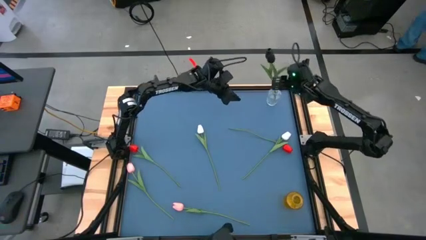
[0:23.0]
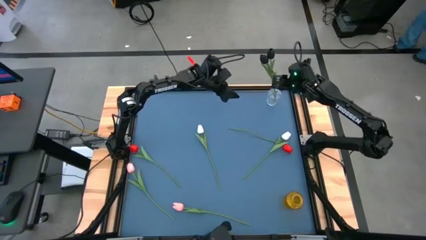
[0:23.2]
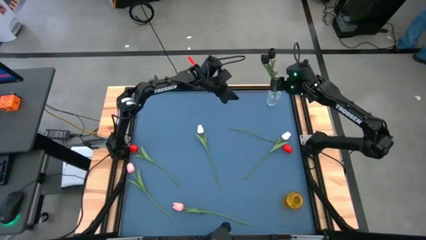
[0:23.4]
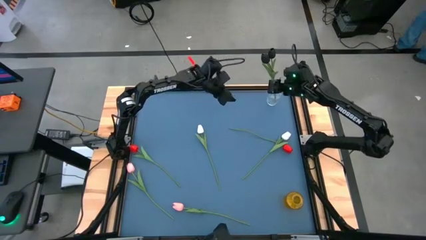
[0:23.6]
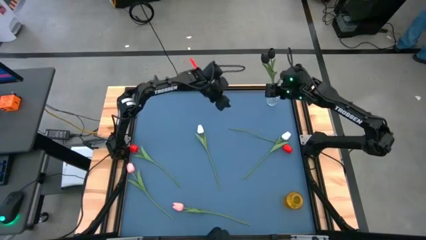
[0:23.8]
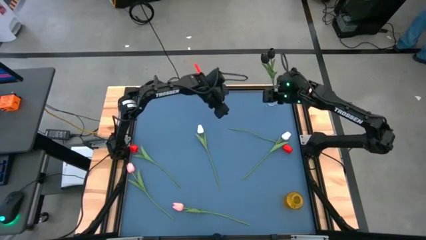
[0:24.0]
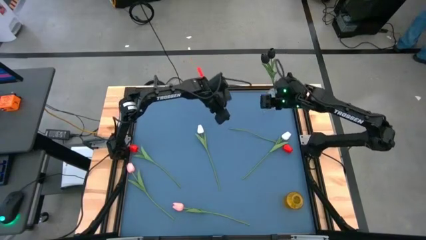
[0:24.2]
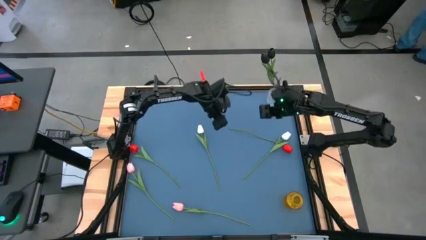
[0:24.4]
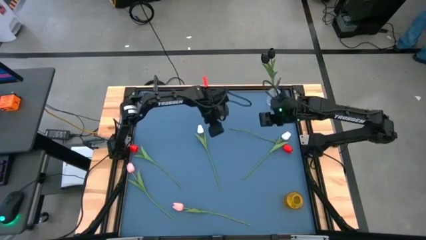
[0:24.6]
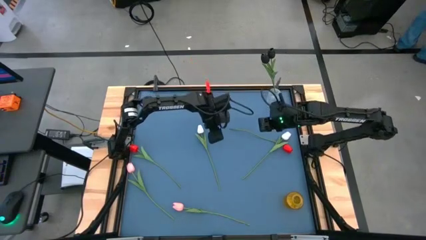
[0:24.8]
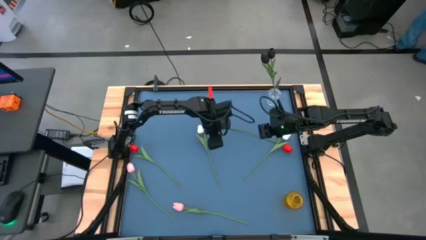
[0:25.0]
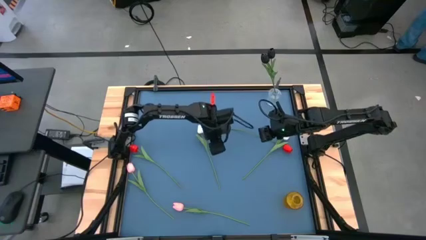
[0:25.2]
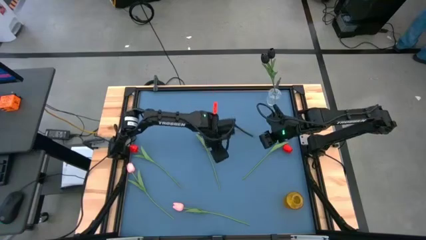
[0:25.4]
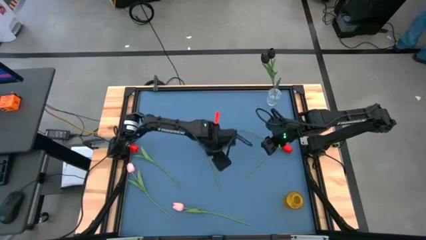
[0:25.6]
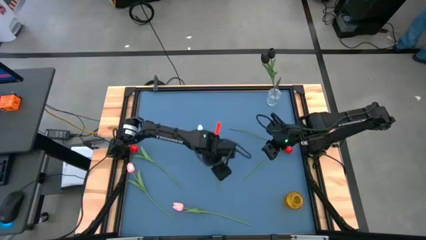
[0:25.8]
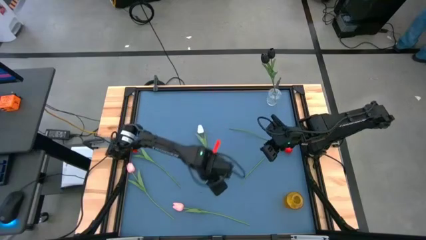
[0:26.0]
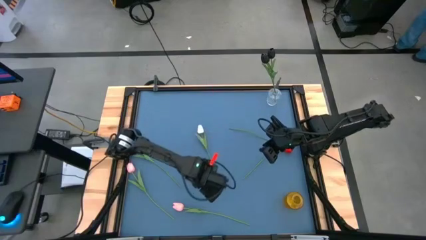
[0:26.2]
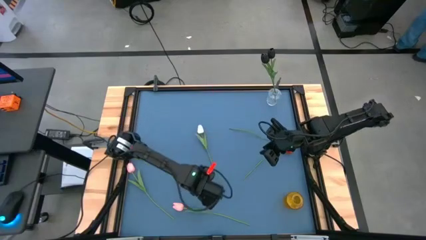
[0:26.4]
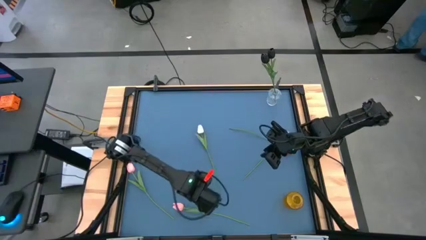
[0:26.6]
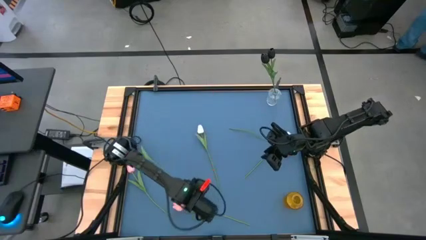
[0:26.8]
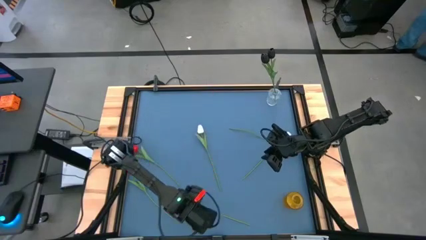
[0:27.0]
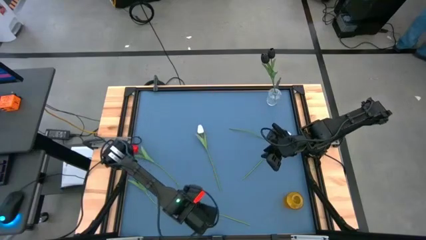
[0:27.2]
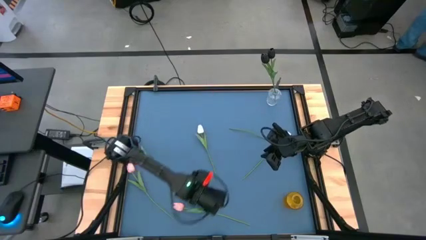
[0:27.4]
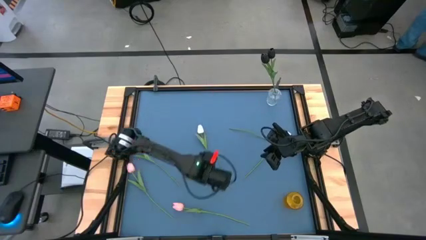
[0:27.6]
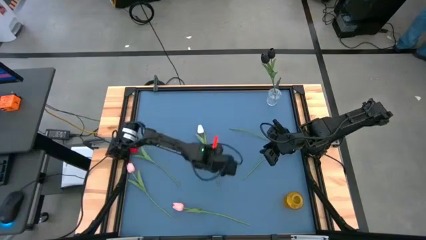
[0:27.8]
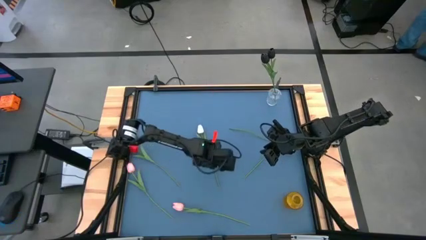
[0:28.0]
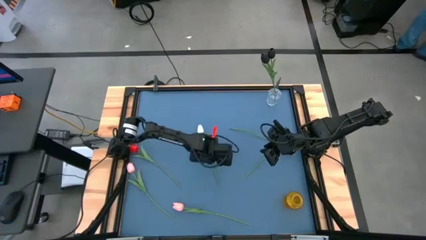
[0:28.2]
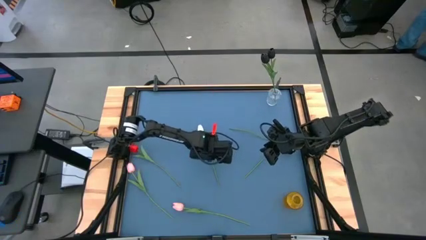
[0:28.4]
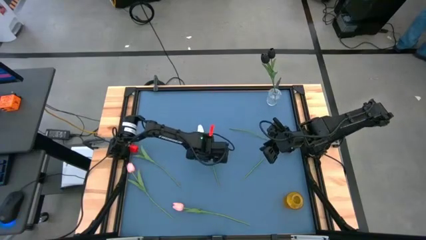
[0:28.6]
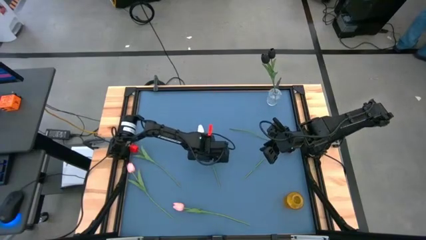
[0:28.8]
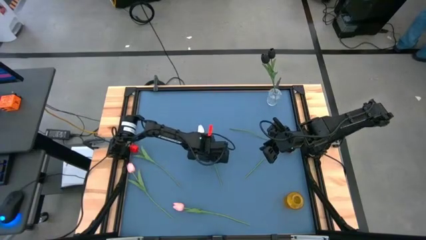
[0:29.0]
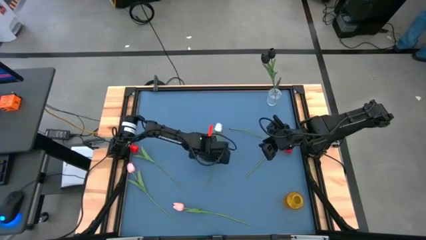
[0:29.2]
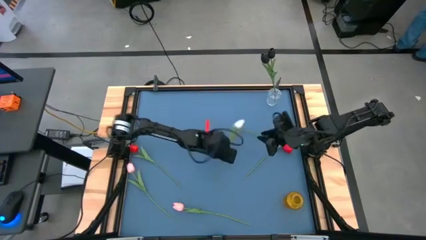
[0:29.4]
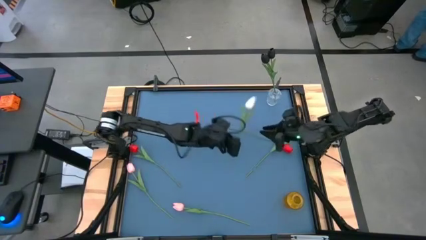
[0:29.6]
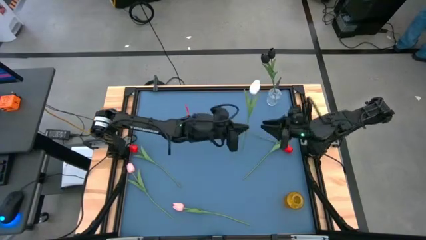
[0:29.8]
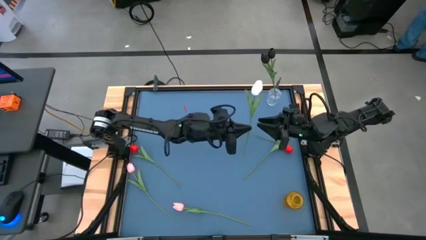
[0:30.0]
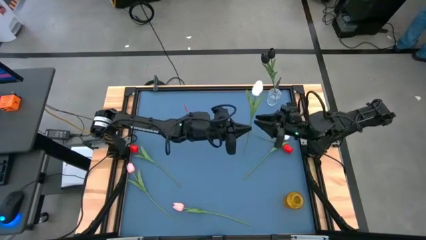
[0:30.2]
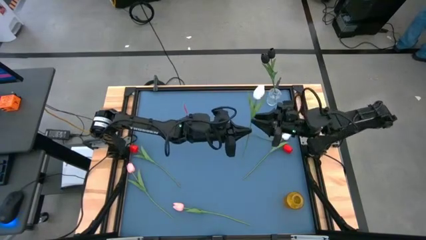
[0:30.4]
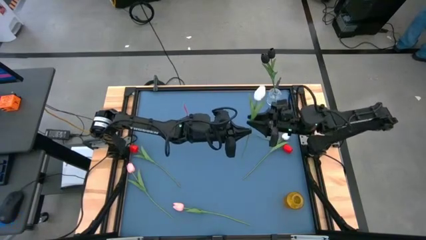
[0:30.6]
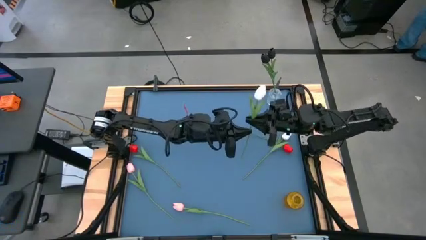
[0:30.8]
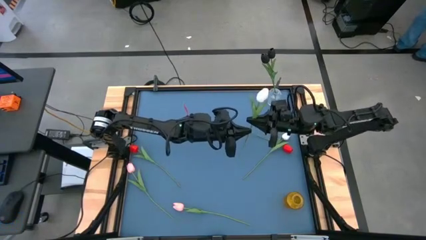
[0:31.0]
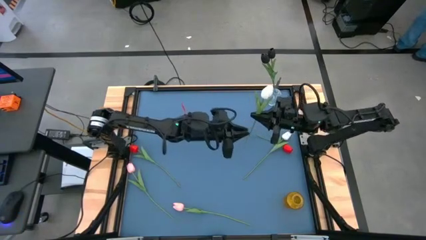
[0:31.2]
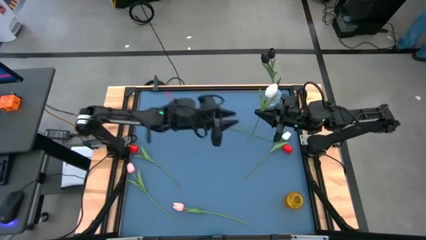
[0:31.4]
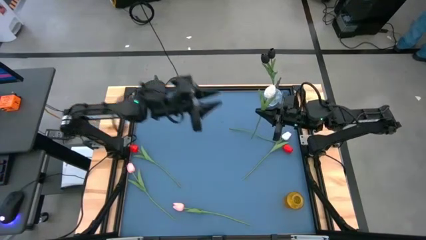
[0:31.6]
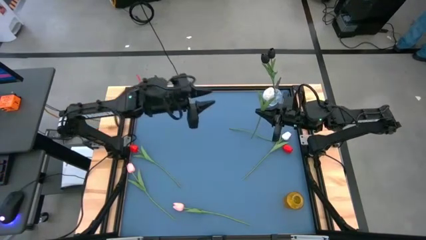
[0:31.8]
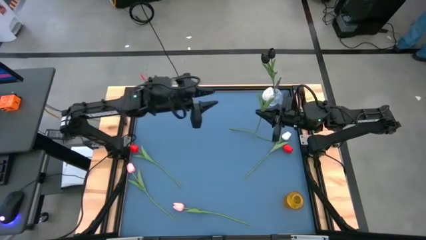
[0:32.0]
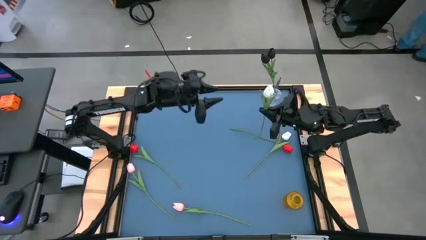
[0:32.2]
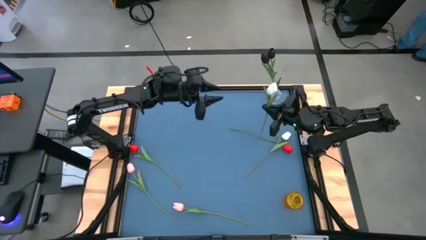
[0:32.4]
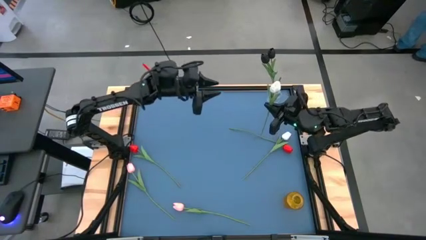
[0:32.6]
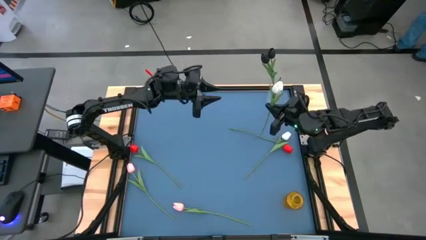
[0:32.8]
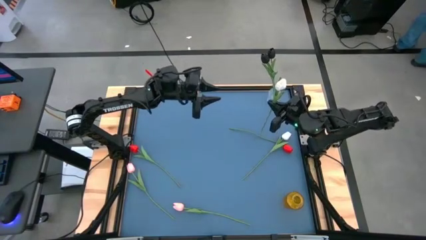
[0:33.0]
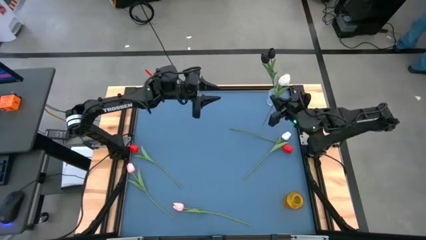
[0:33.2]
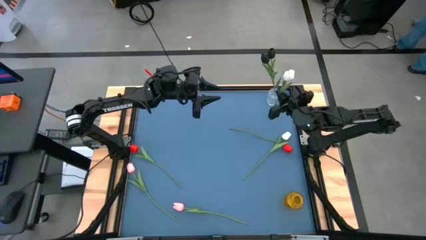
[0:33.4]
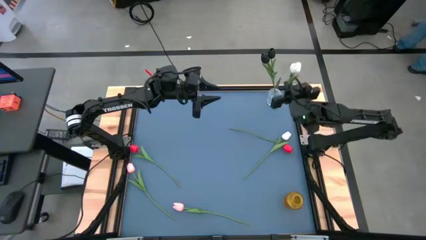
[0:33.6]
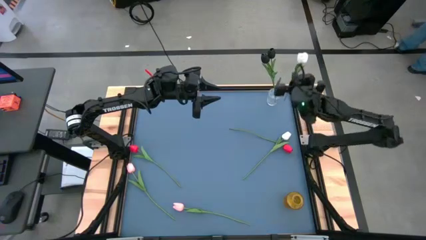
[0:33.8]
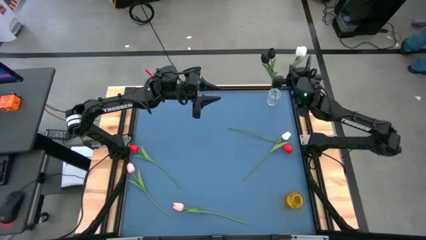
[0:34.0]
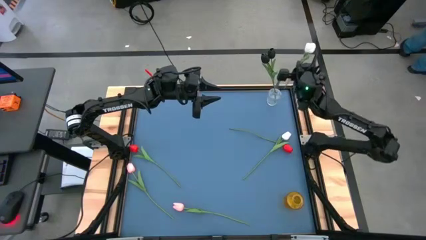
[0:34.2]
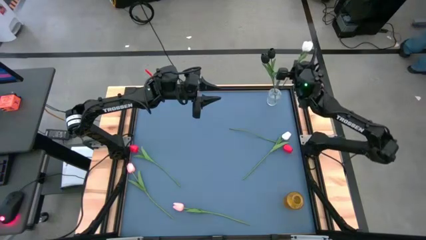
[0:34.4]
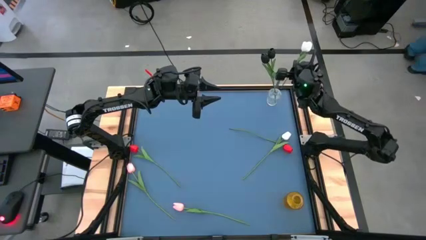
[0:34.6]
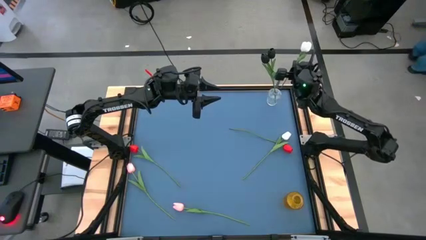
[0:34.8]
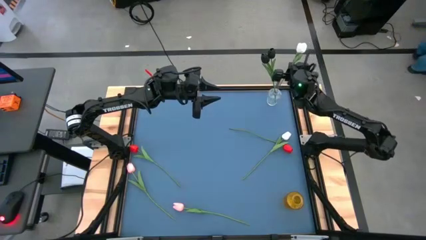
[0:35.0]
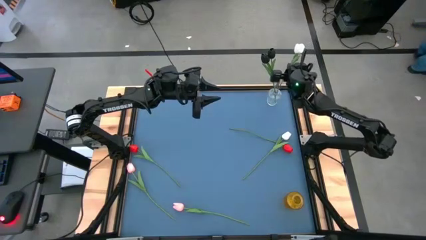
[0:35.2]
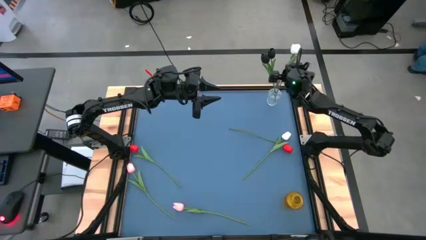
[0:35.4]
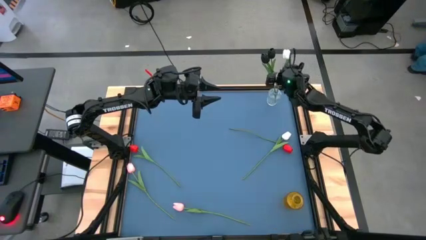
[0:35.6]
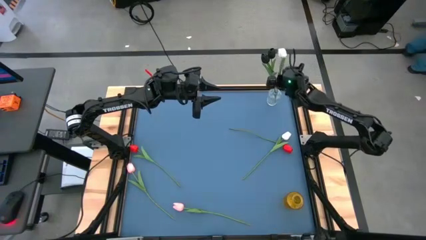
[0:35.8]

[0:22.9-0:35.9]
Task: Sort flowers into vase by color
Put the left white tulip into the transparent vase

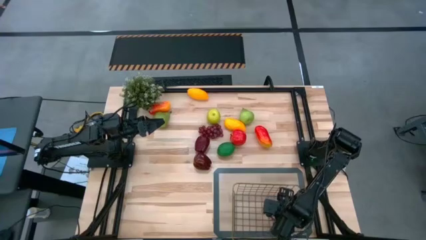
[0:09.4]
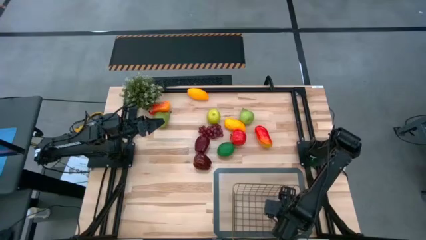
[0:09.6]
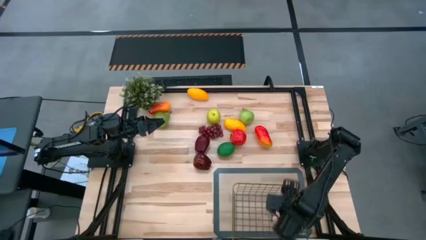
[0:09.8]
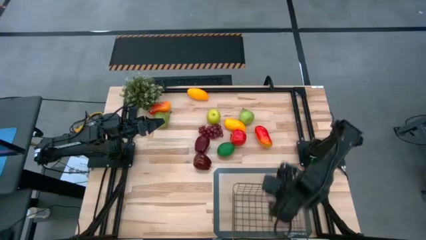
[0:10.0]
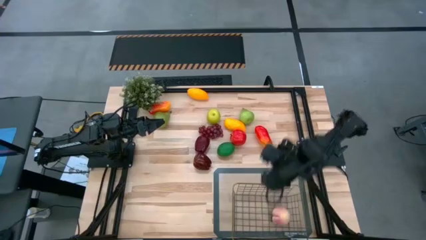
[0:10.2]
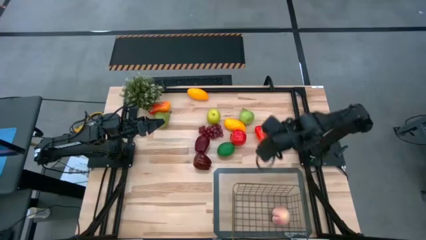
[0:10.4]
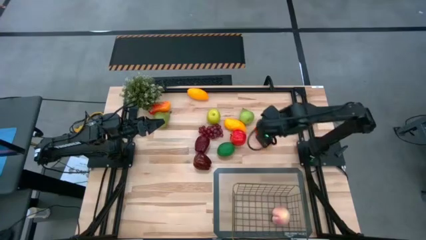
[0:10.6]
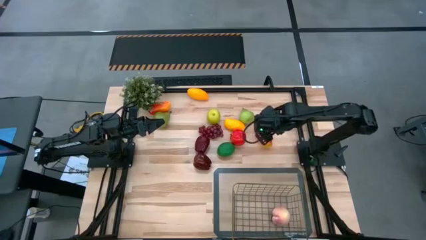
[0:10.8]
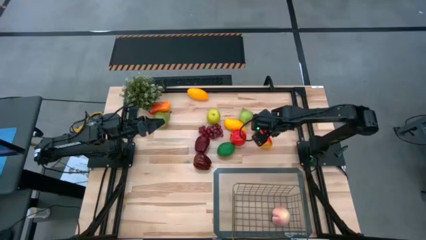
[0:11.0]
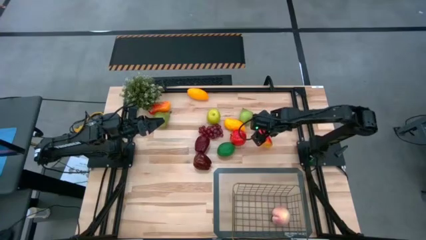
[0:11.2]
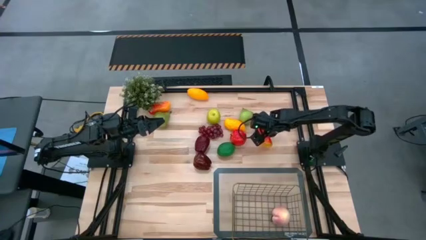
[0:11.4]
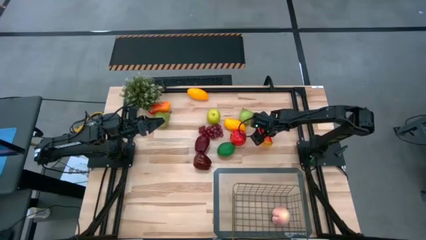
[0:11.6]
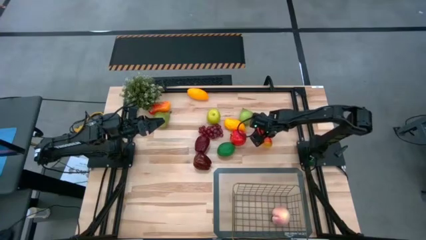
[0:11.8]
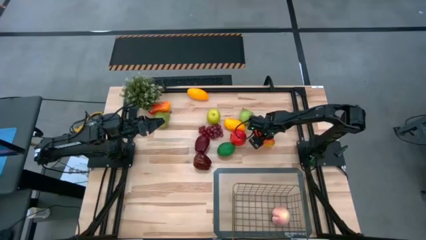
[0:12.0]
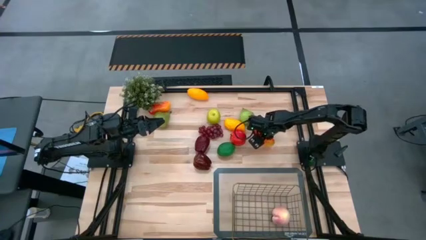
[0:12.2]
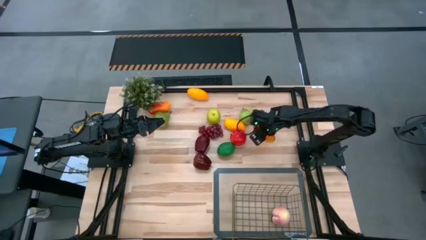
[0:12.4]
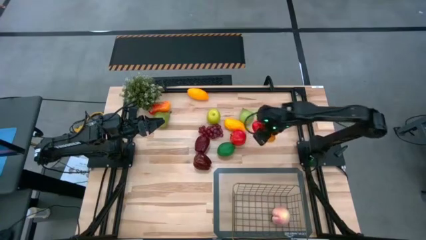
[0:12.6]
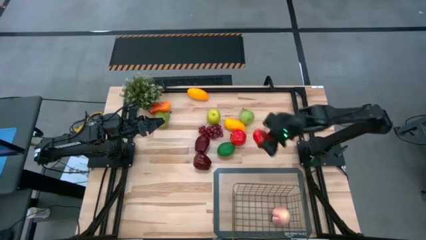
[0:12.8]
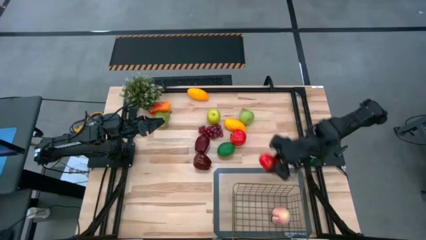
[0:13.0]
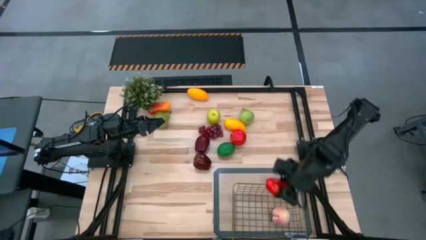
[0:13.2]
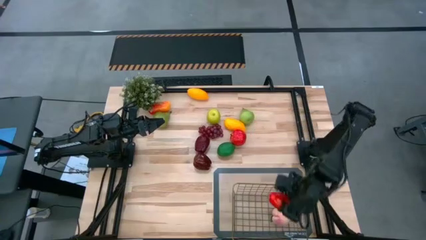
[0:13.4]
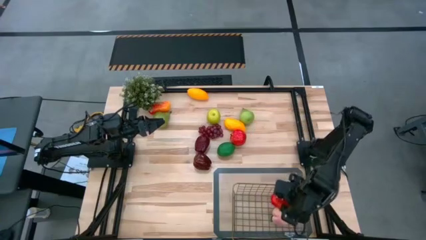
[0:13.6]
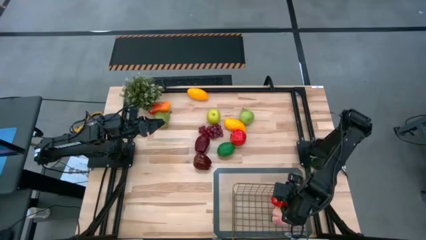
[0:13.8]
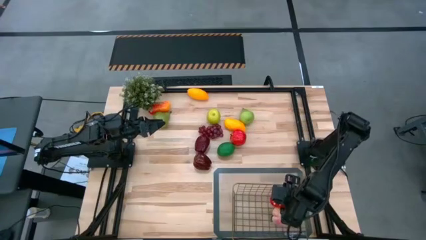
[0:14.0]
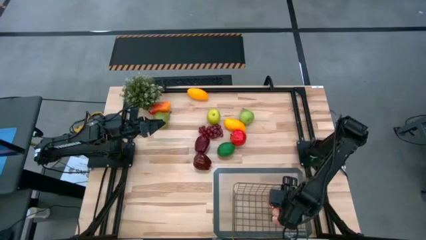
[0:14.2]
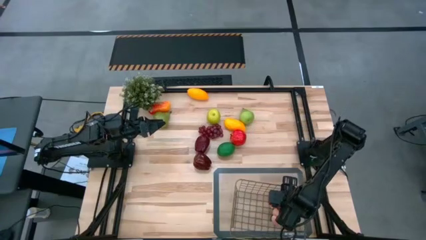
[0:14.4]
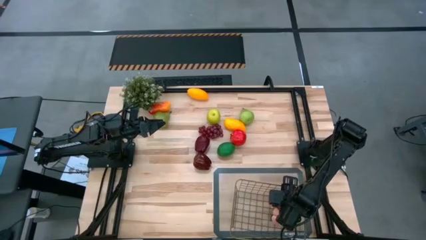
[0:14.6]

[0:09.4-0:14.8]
Task: Build produce basket
Put the red mango into the wire basket
